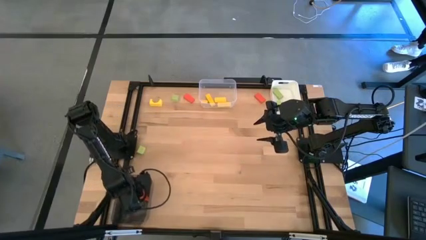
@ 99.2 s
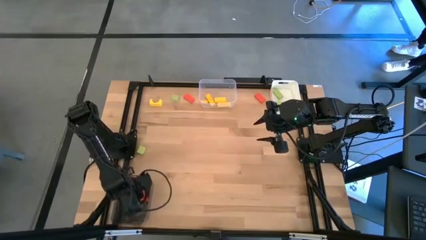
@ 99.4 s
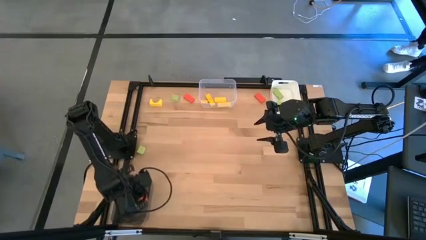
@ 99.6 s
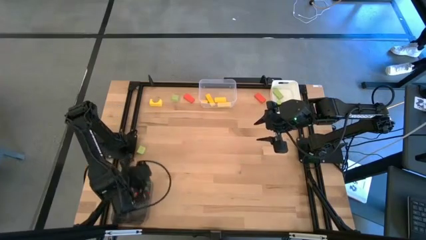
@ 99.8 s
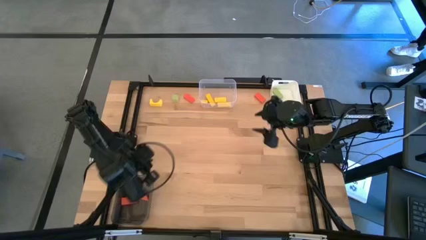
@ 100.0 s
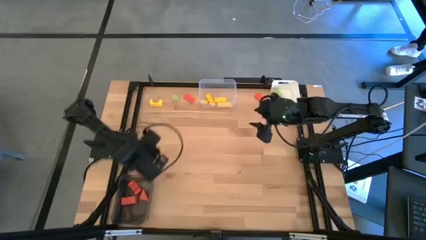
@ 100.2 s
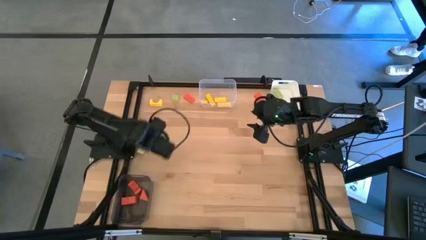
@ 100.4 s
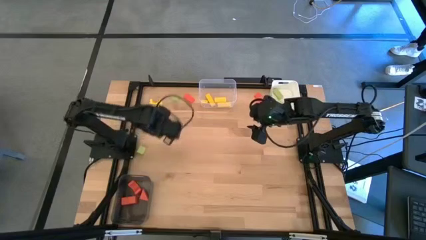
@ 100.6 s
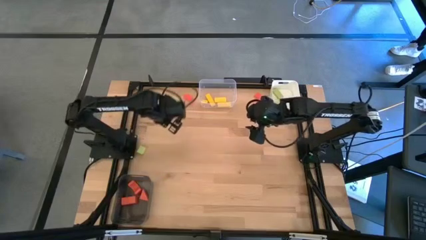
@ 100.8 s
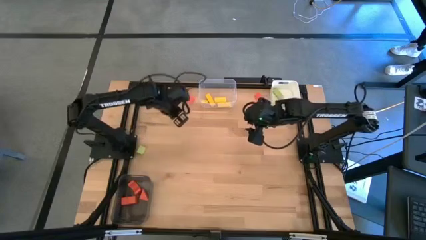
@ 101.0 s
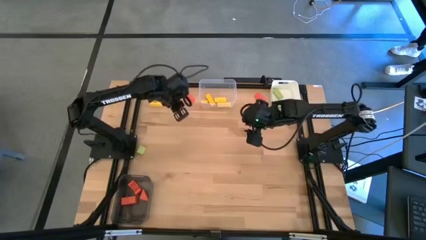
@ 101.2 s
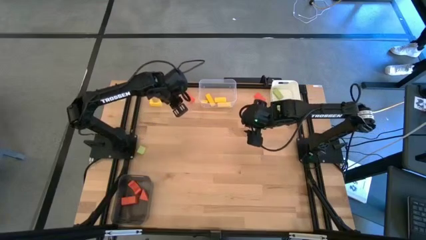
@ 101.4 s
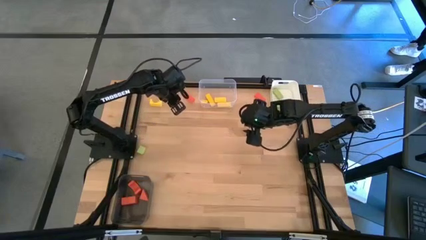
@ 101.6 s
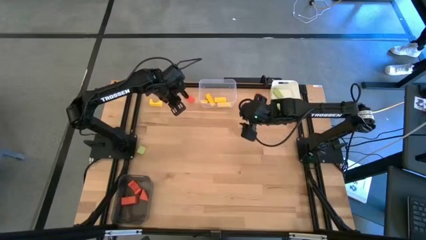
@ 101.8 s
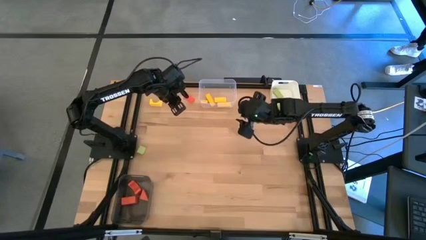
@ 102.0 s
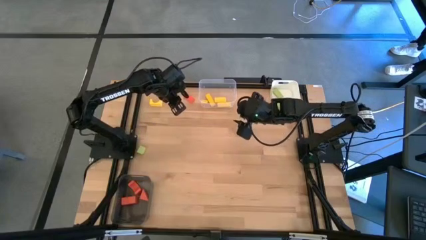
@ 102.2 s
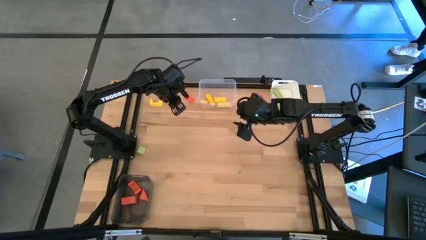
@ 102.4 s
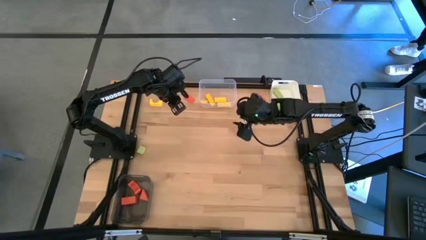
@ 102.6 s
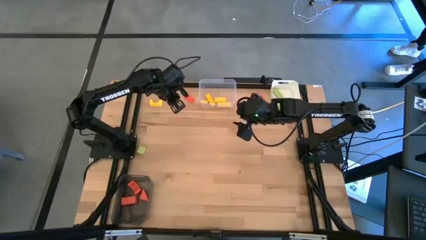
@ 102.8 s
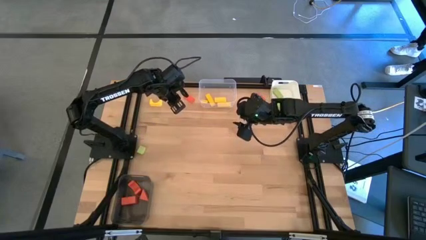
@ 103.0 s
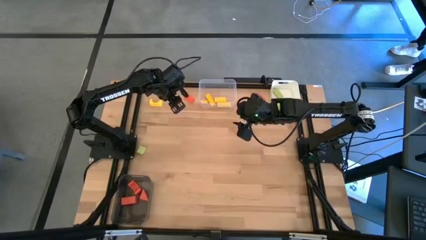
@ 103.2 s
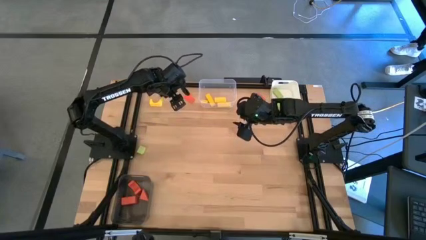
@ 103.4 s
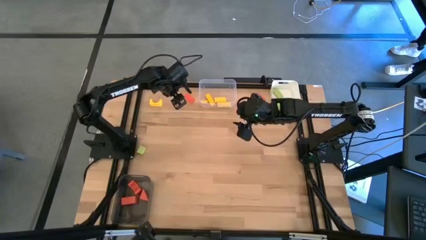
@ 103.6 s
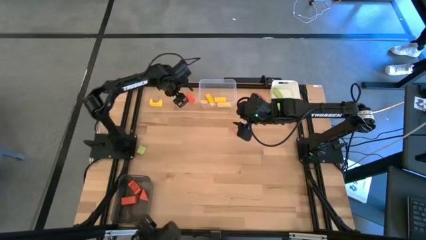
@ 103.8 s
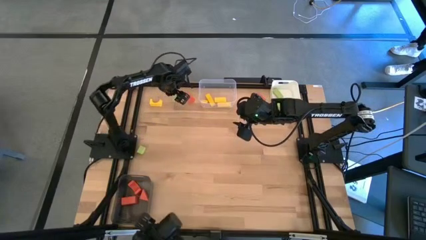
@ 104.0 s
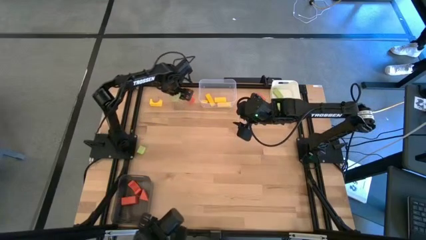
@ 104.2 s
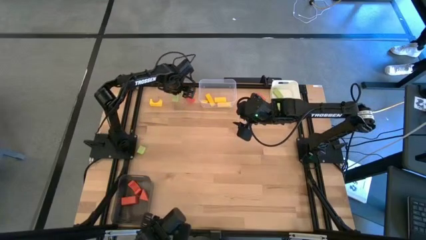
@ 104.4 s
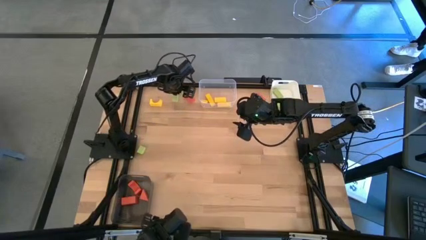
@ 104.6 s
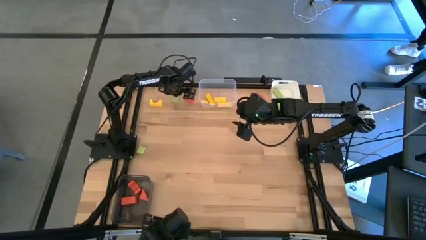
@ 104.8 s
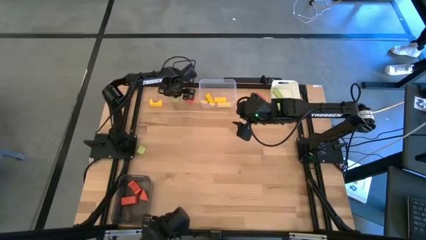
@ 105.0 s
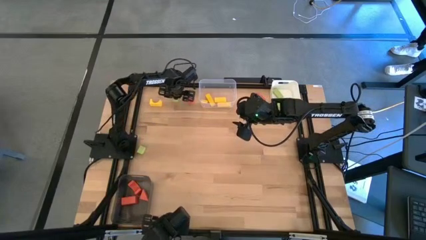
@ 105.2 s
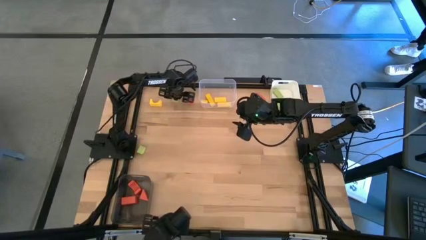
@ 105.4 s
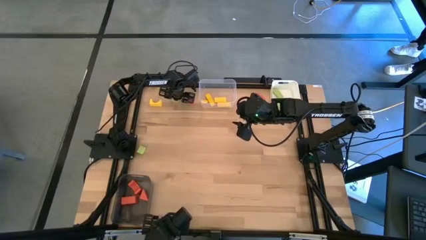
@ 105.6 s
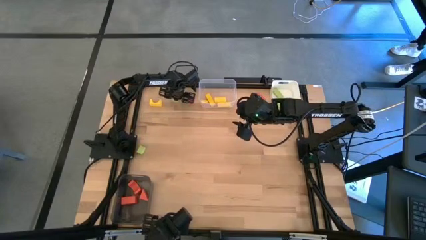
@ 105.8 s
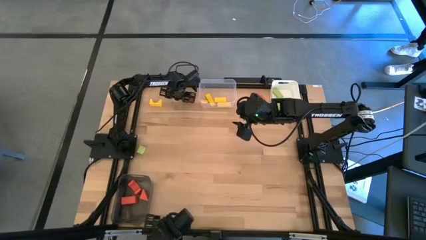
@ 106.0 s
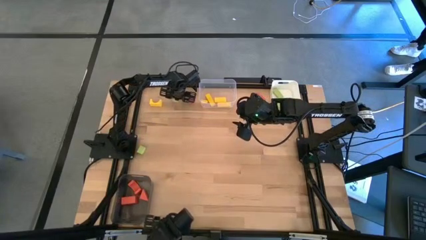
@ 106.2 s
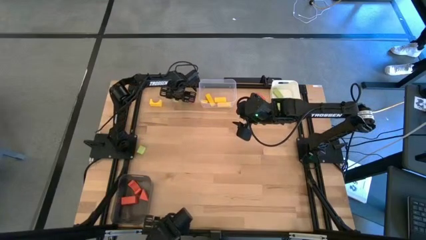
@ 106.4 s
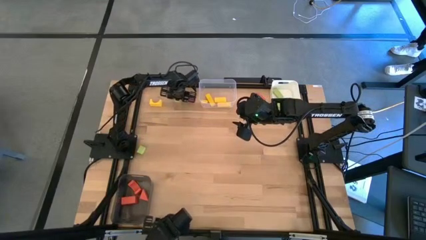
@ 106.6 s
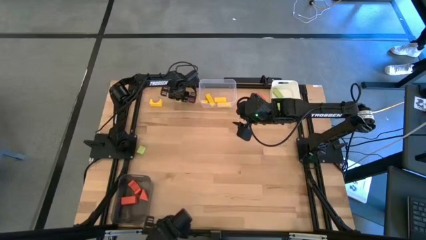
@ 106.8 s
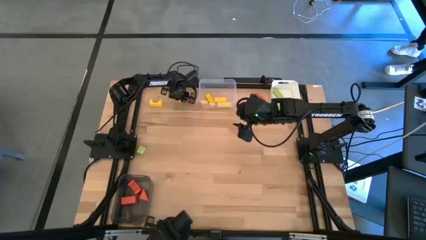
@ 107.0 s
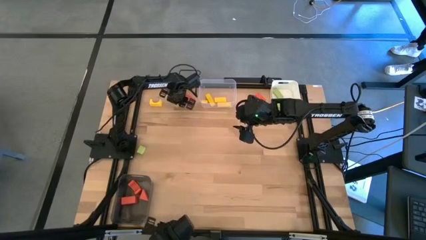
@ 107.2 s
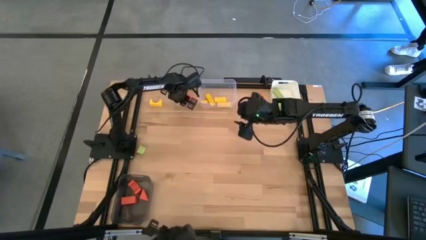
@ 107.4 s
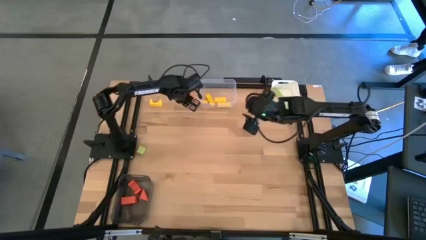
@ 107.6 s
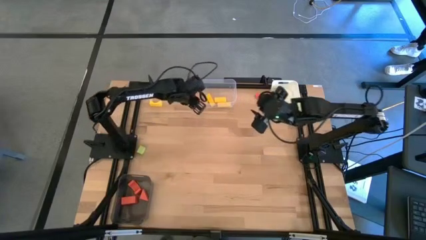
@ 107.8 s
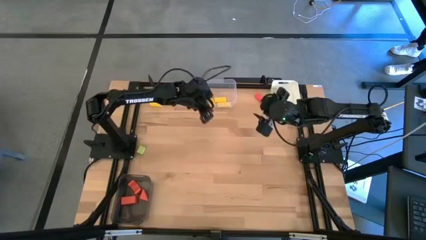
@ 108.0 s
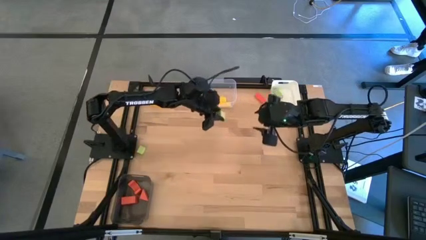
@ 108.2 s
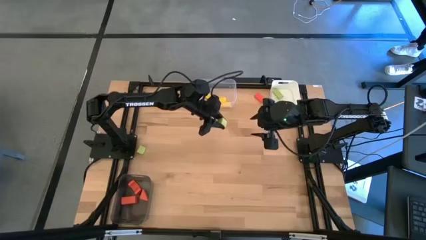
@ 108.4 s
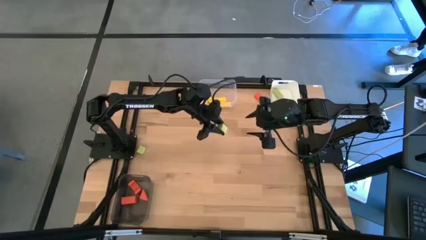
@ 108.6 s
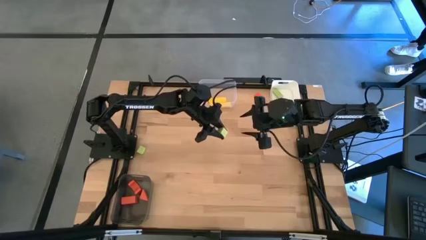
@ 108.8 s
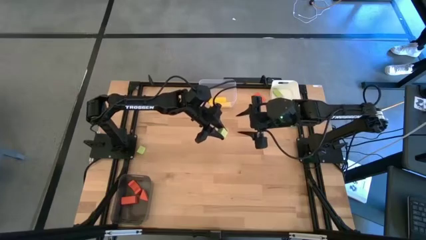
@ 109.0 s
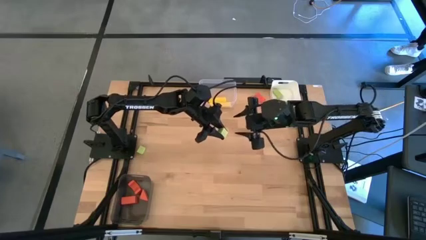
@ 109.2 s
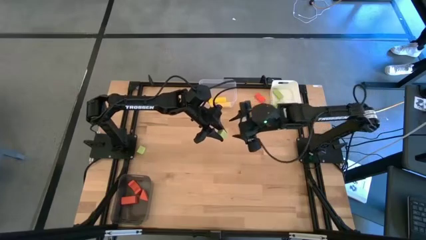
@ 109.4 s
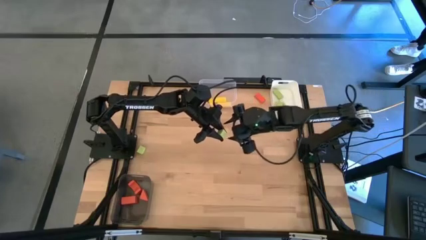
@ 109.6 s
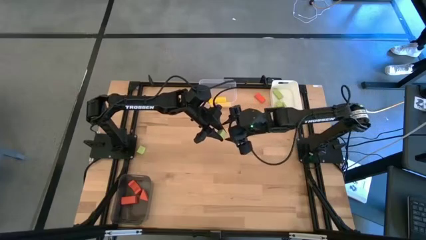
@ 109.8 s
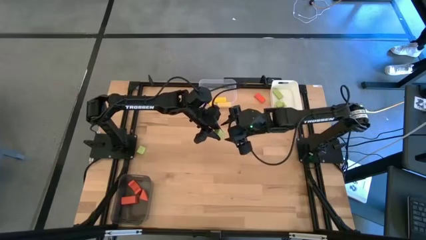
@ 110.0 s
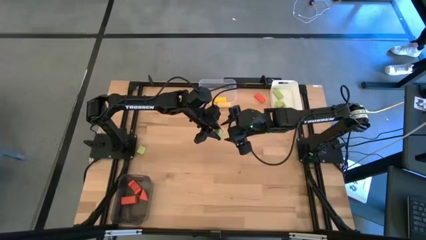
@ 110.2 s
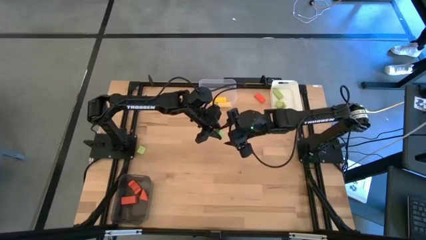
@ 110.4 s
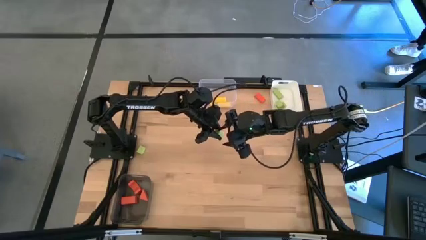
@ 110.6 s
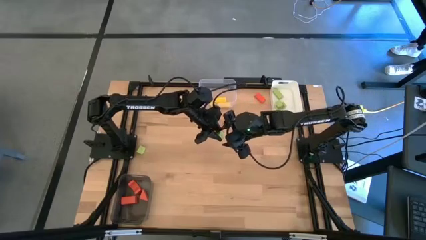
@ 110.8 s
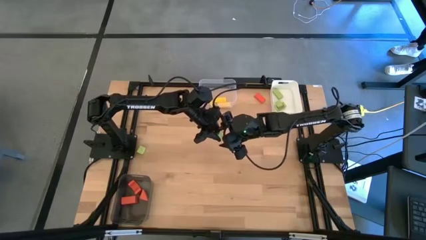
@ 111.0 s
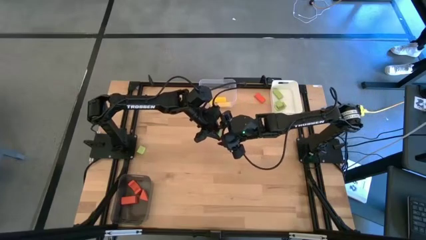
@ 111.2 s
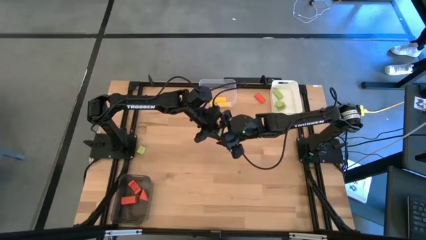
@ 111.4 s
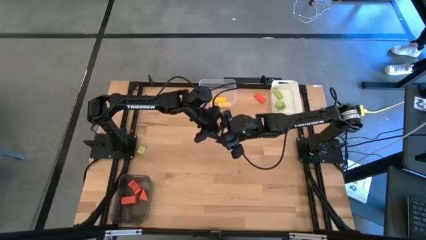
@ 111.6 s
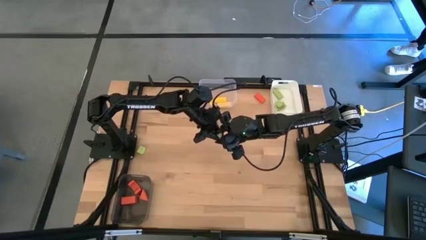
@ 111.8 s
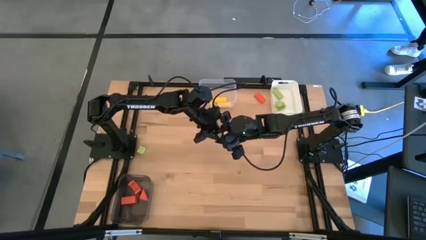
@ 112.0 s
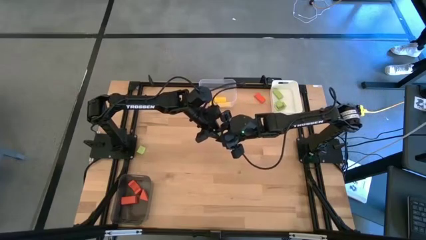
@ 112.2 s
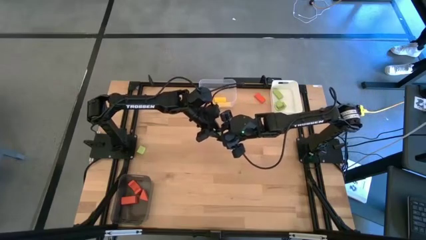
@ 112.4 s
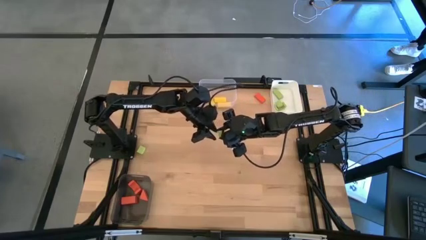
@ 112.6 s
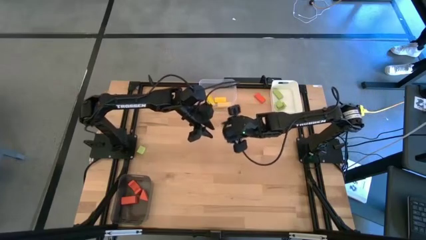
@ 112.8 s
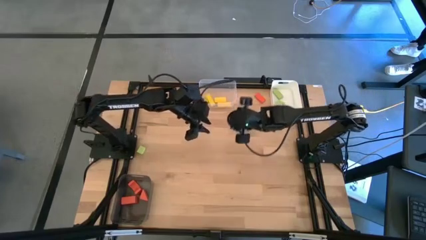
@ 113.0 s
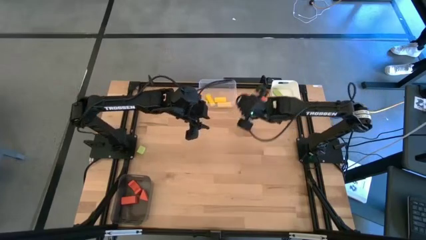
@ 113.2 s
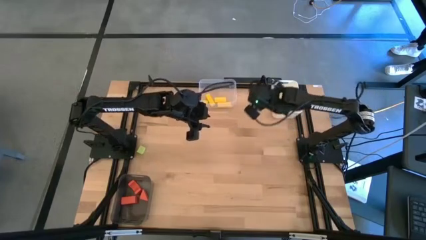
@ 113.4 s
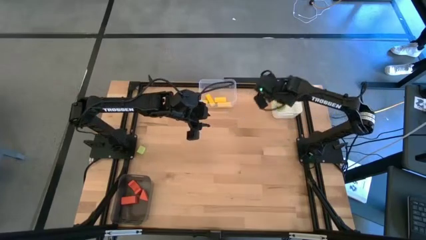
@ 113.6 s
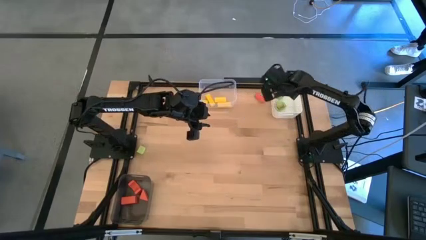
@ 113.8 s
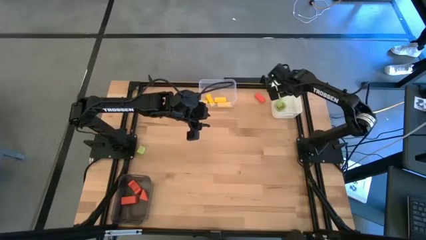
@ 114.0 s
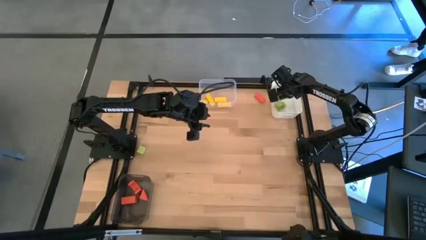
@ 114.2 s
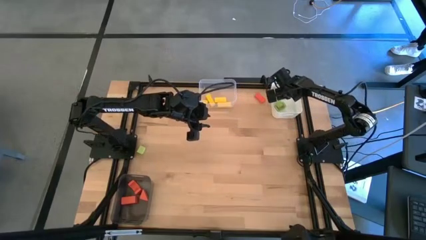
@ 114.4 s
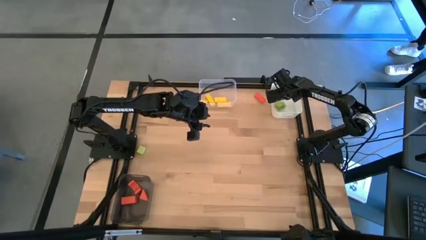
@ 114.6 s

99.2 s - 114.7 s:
Task: Sort & place blocks by color
Put the green squared block into the white bin
